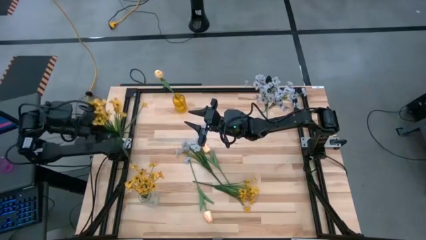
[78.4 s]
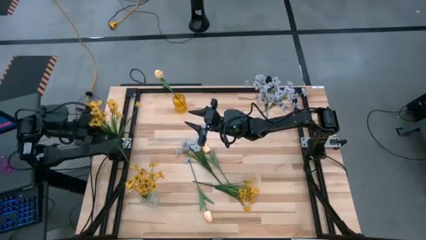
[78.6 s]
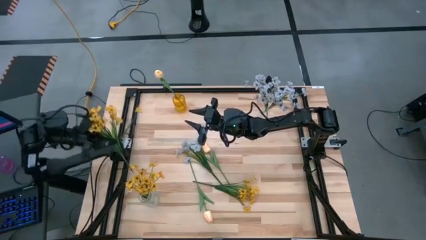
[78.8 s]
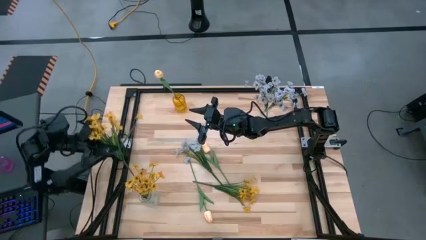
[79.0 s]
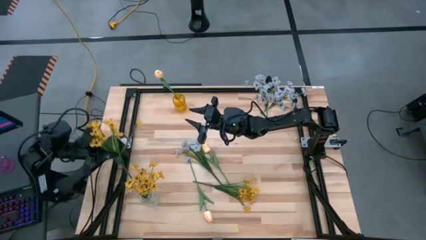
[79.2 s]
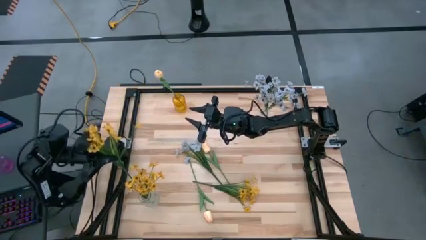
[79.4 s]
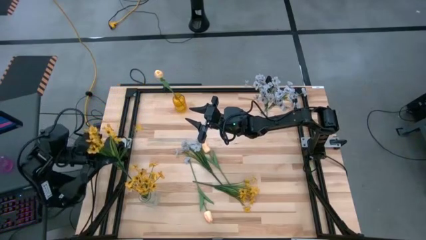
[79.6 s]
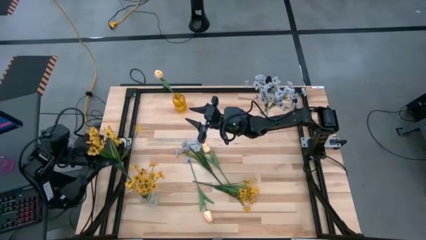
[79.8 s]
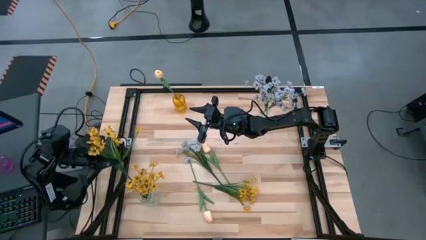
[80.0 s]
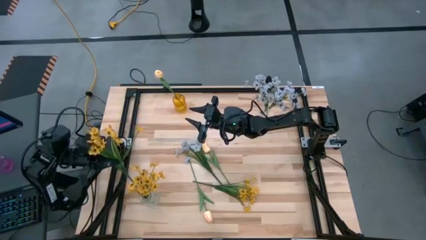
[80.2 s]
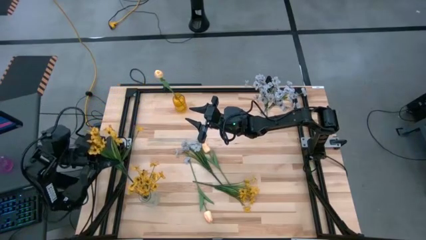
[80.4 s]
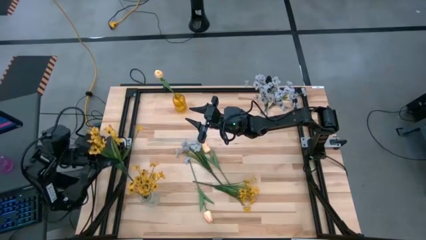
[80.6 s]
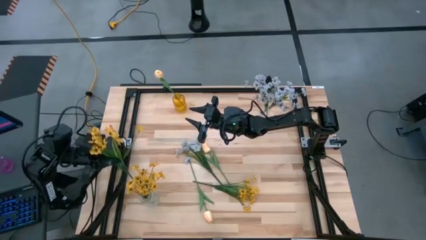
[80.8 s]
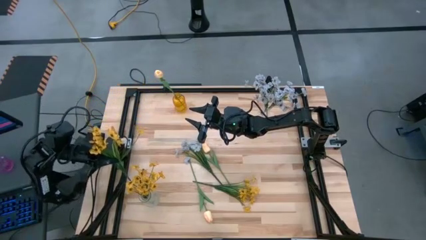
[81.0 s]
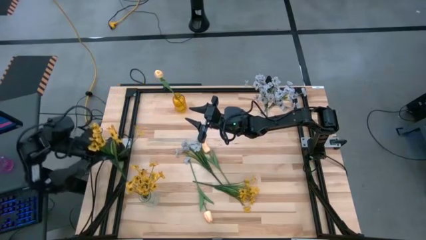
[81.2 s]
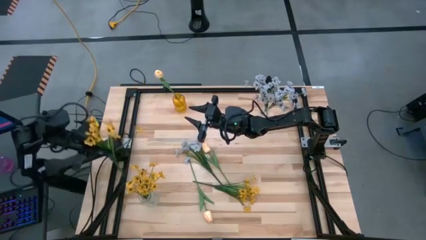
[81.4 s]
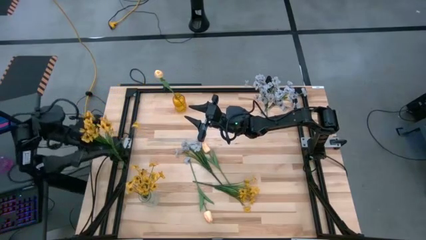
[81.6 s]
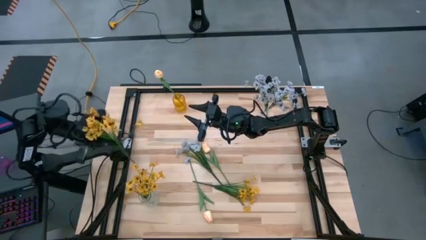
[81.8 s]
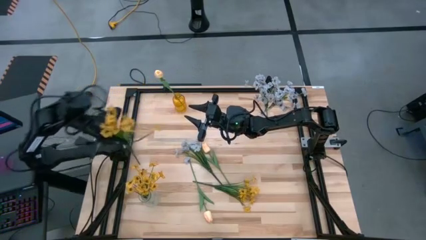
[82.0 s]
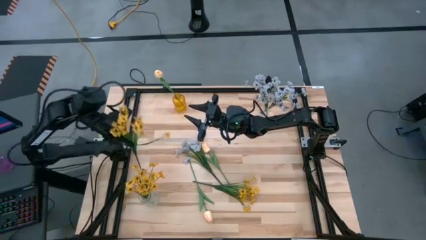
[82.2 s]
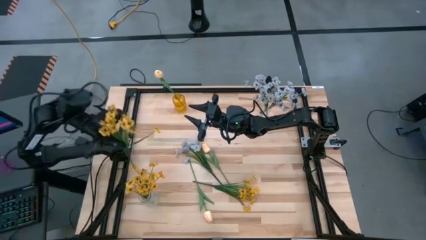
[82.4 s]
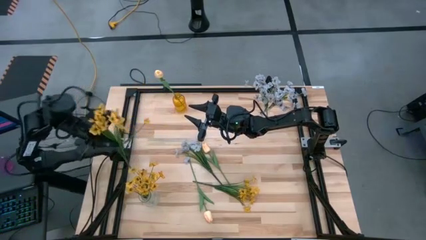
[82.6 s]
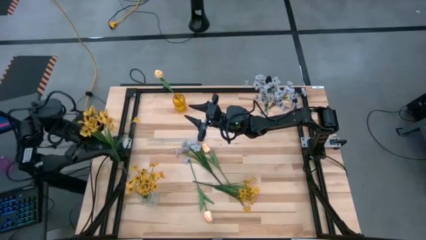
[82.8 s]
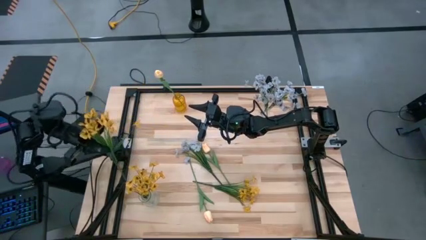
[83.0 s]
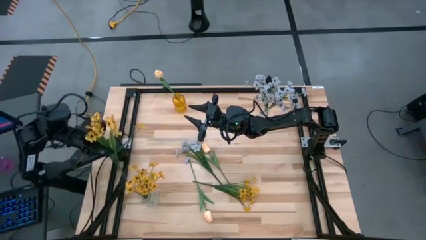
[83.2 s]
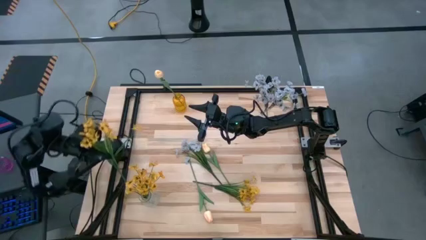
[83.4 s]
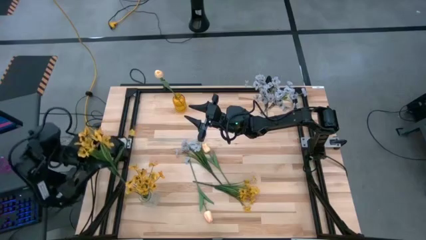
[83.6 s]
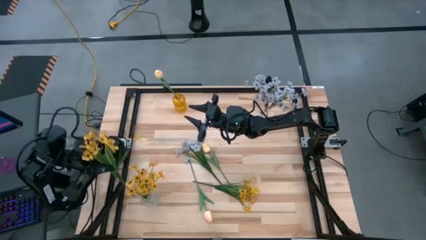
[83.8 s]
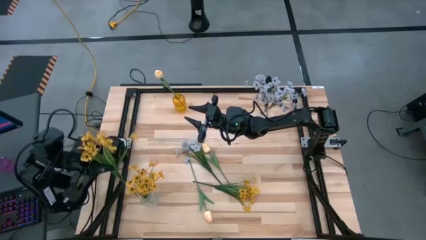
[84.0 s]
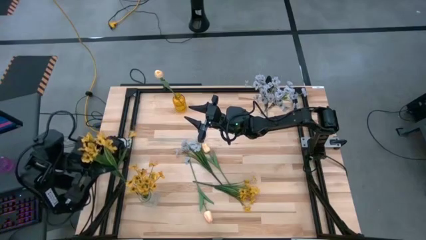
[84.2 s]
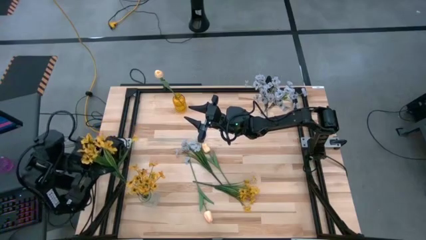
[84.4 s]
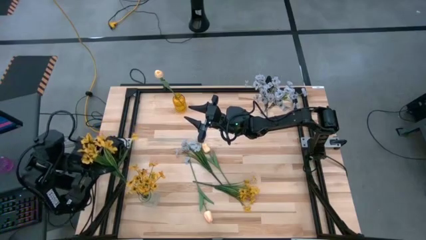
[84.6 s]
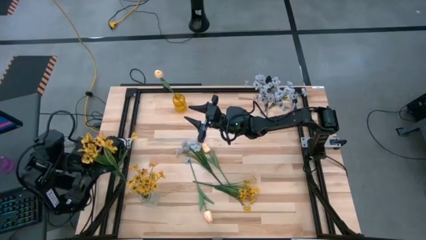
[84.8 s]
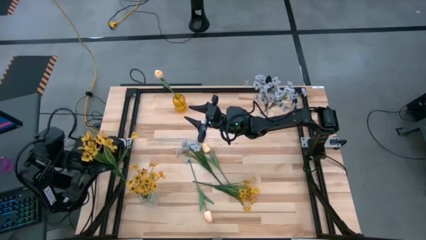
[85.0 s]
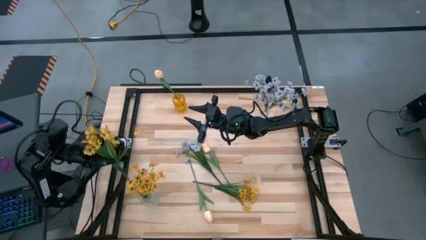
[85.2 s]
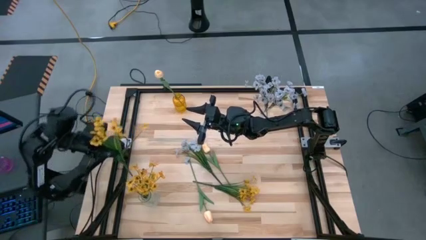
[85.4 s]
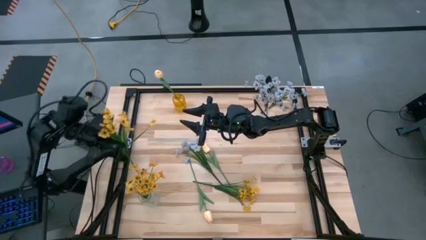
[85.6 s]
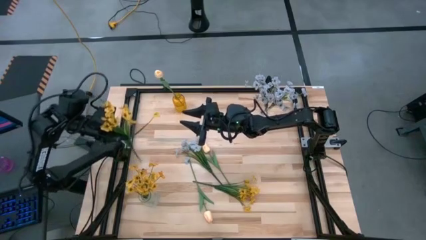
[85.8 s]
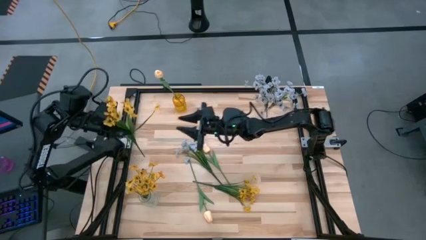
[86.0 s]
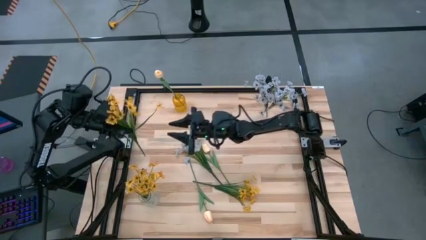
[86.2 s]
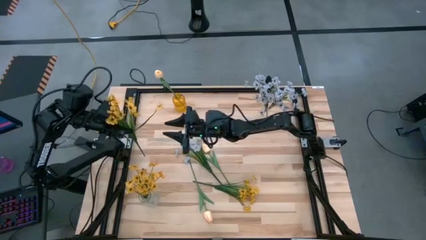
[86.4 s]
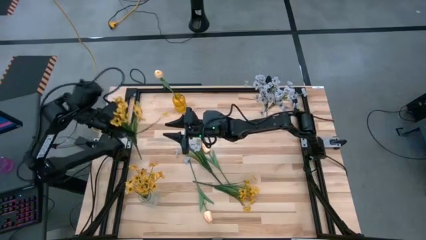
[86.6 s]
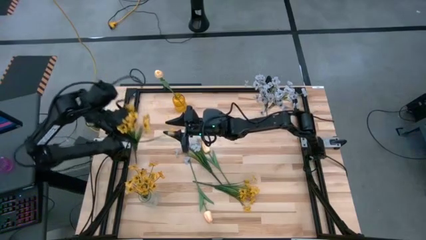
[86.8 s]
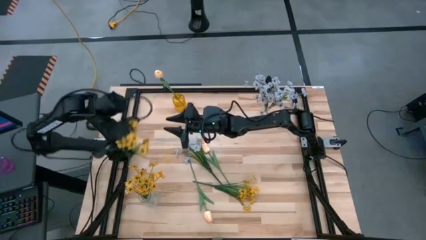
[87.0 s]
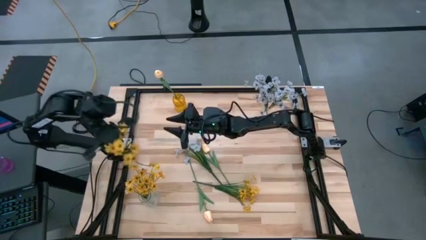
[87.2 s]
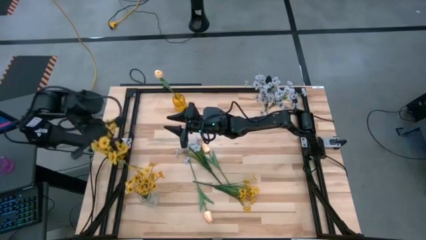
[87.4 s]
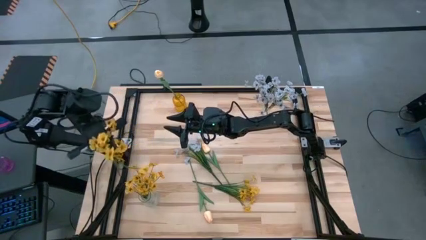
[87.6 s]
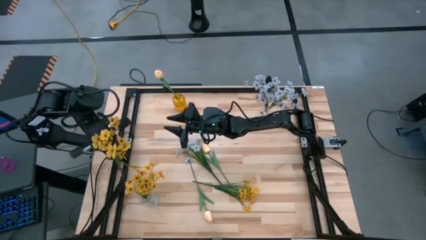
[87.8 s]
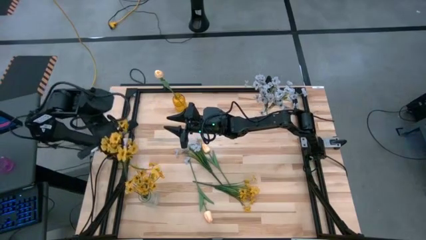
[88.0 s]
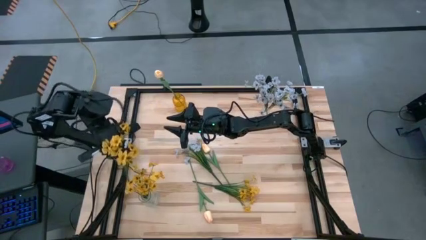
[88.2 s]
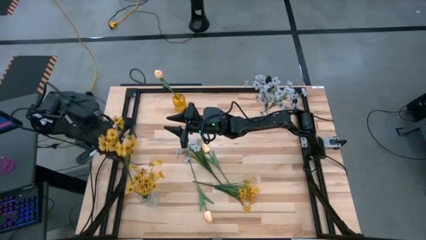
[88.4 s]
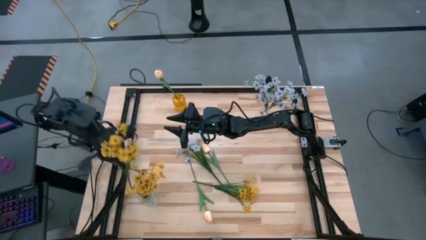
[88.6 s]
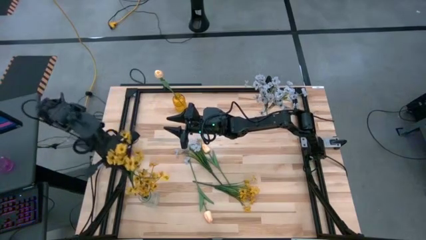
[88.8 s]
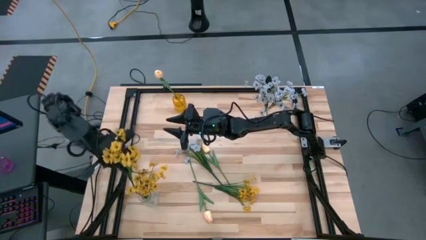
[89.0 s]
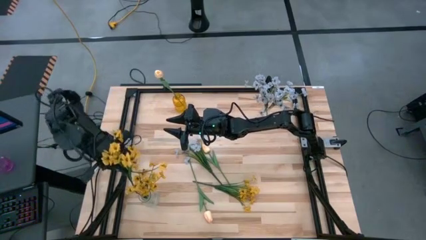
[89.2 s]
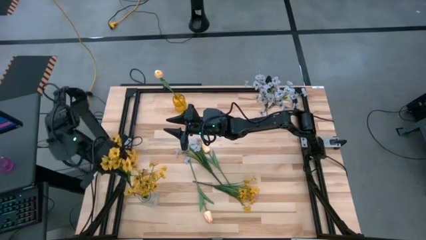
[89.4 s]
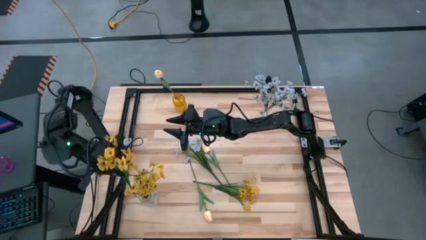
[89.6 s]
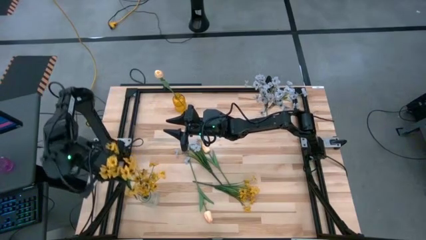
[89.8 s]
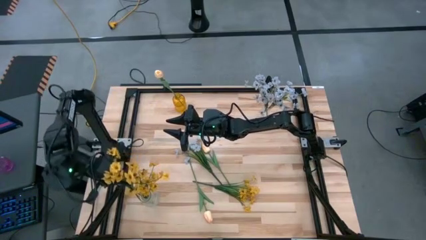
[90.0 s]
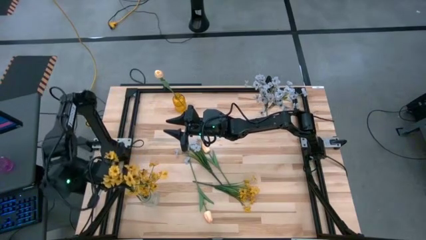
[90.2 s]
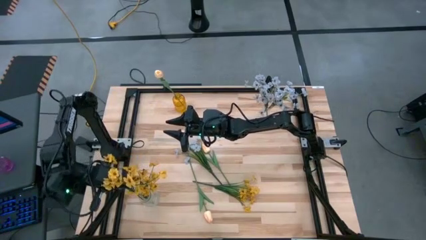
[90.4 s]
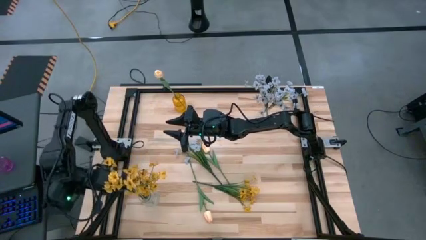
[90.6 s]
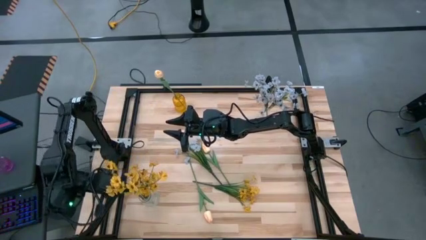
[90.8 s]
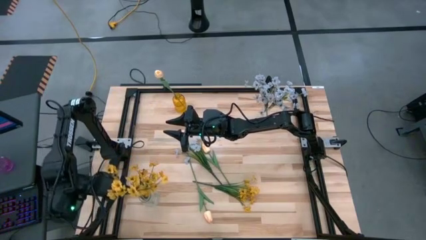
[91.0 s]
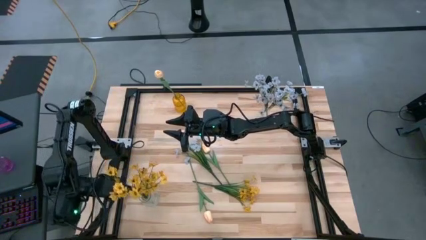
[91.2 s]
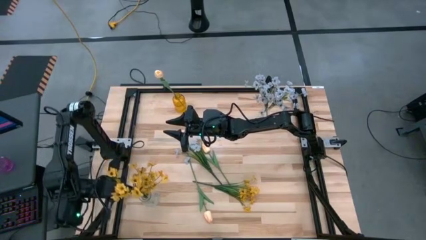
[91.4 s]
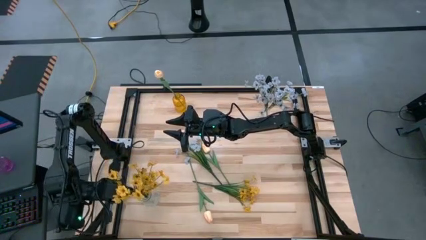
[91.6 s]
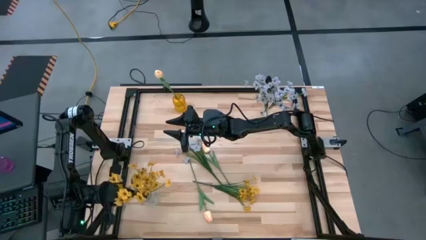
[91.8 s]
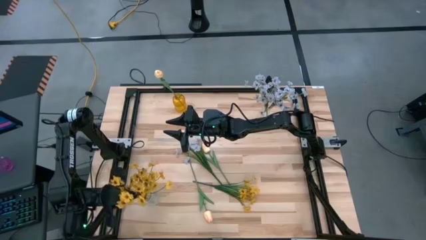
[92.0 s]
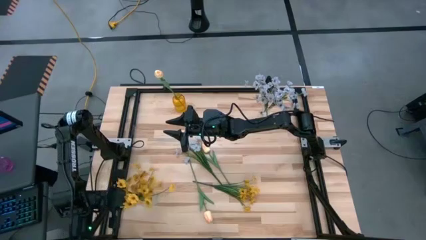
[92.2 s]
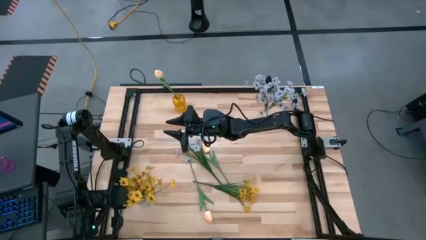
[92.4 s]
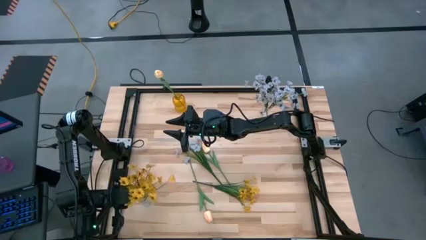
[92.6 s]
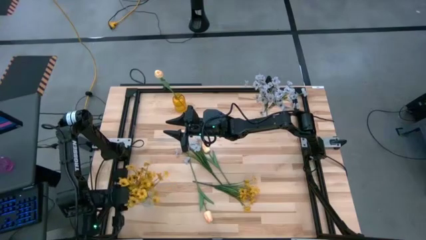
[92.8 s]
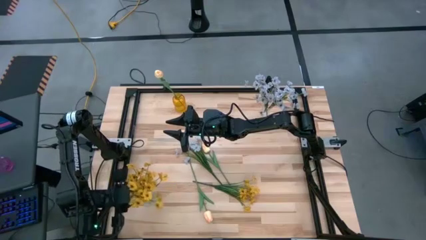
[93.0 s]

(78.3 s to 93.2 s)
Task: Sort flowers into vase by color
Put the top yellow flowers into the bottom transparent vase

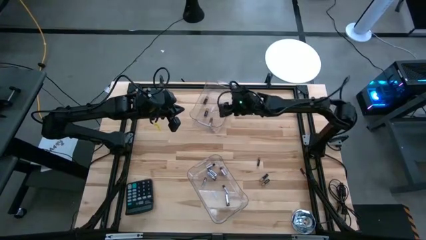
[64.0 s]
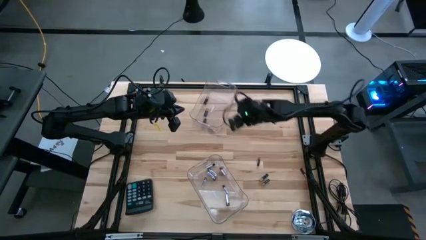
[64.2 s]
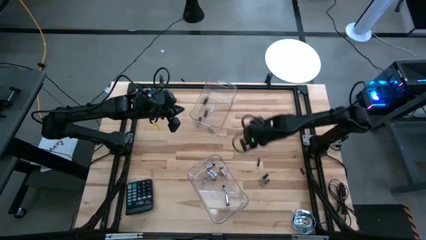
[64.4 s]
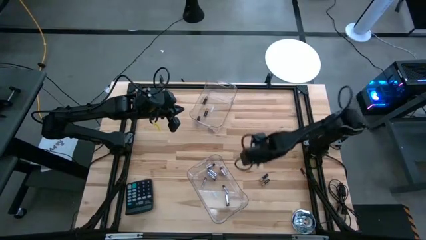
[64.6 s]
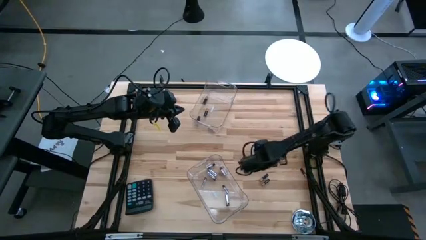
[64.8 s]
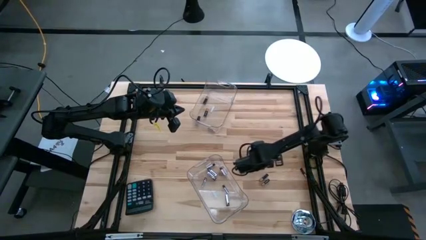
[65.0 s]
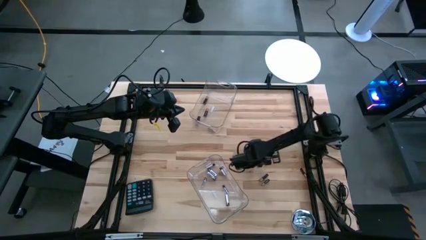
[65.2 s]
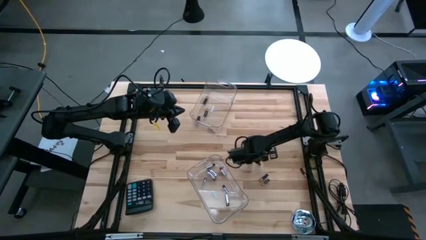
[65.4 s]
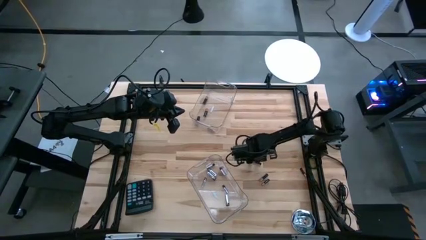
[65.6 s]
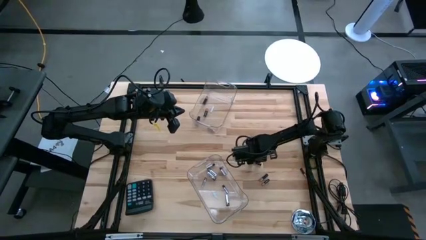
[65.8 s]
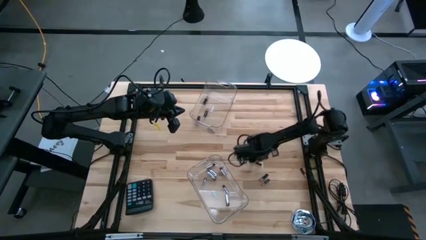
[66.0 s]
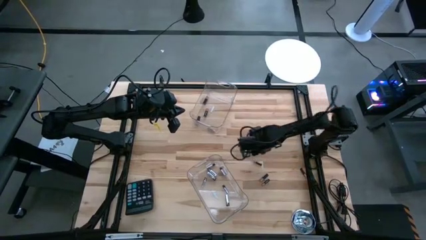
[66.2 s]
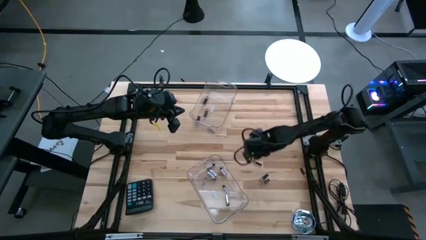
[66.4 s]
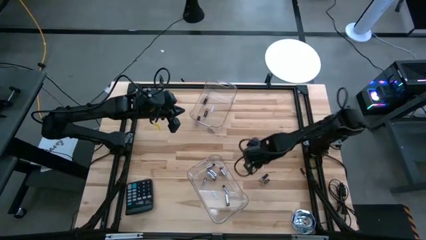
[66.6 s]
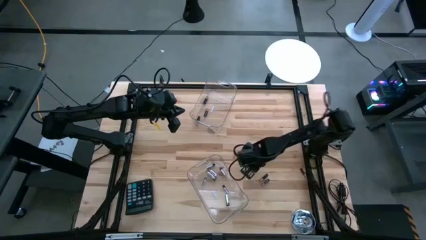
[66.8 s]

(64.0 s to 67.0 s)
Task: Sort batteries
Put the black battery into the top transparent bin
